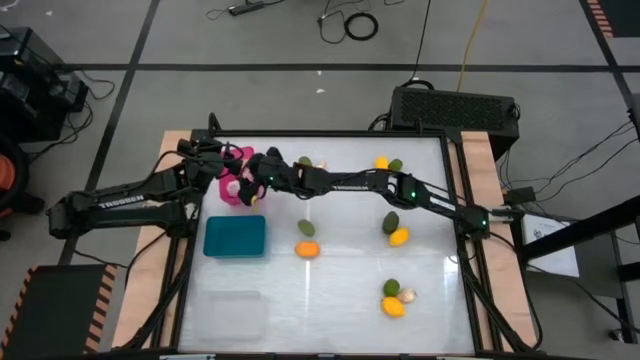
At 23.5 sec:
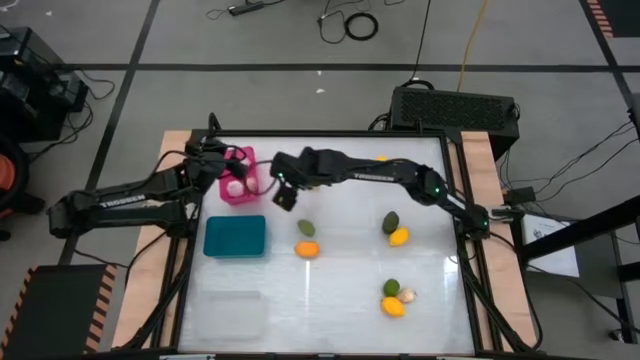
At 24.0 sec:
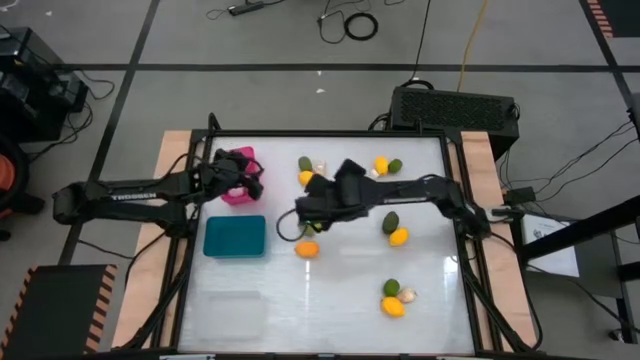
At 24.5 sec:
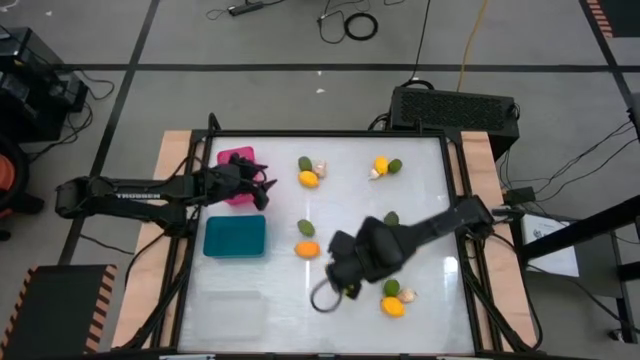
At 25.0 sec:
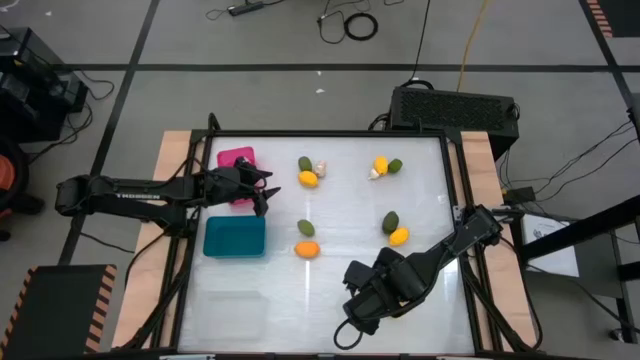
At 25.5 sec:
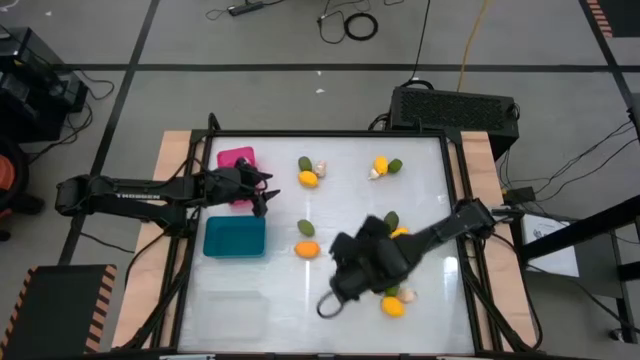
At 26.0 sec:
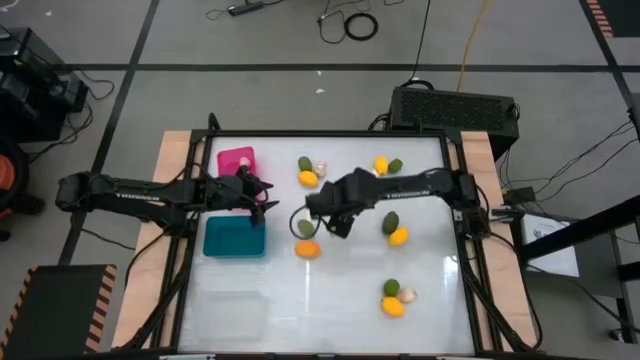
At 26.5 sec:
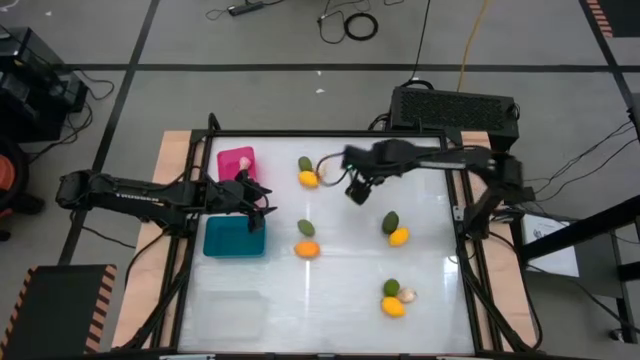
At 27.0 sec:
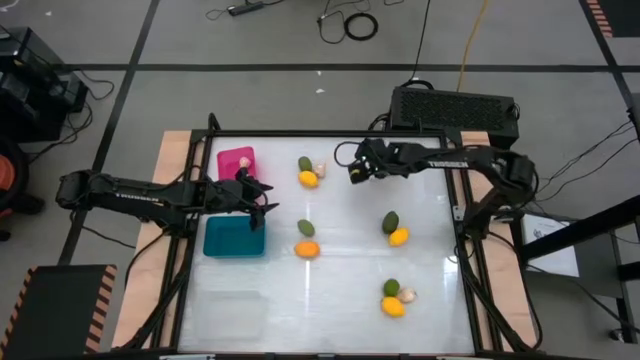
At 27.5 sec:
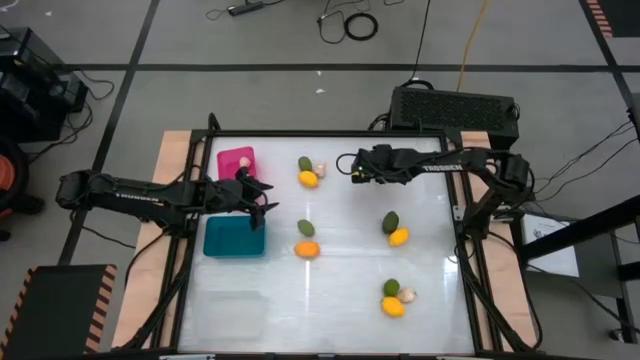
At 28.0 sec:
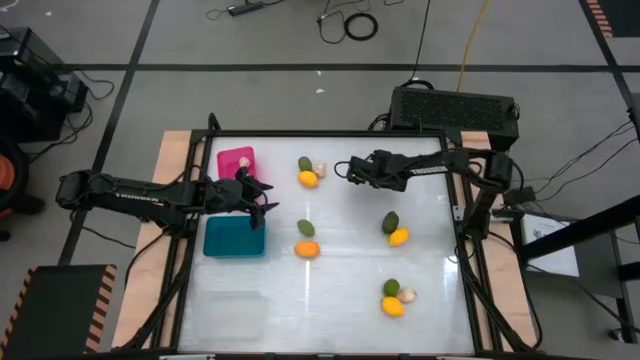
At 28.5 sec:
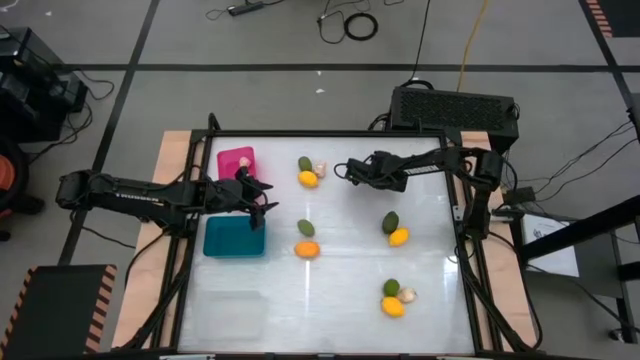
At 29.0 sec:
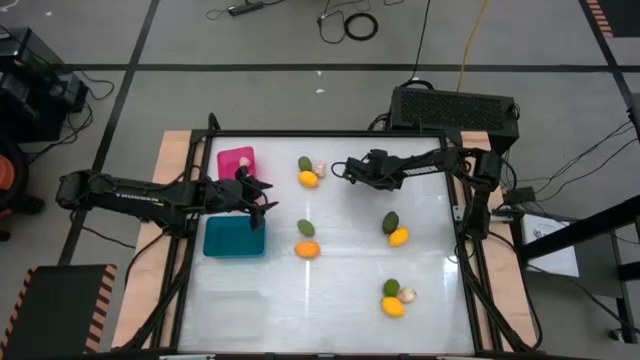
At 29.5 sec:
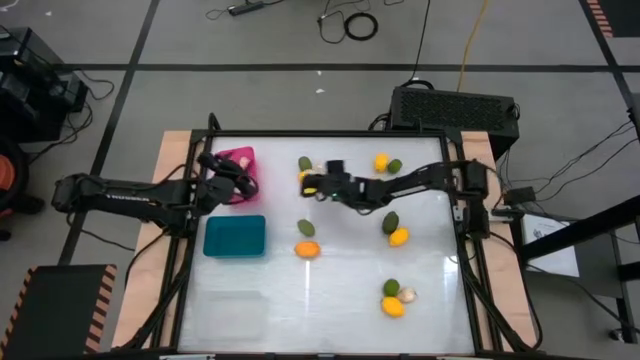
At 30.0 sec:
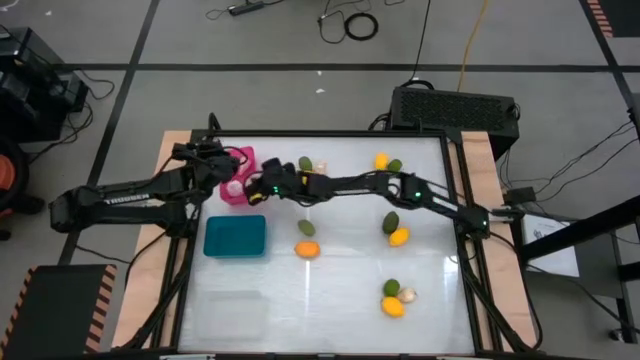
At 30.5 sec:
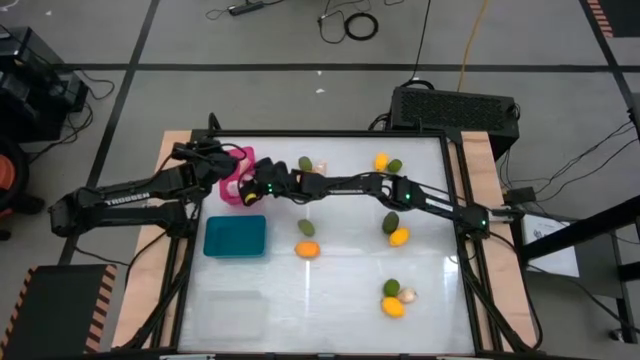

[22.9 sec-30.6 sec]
Task: Sort produce into baskets
Put the white garlic into the pink bin

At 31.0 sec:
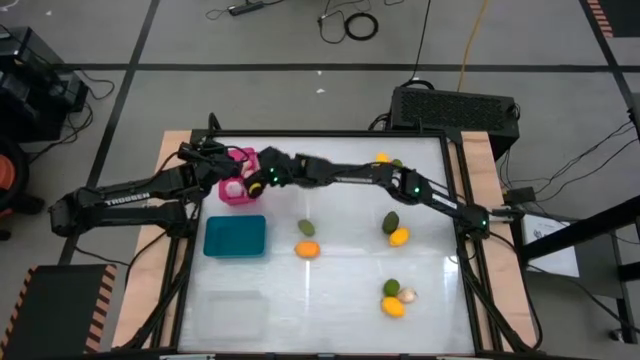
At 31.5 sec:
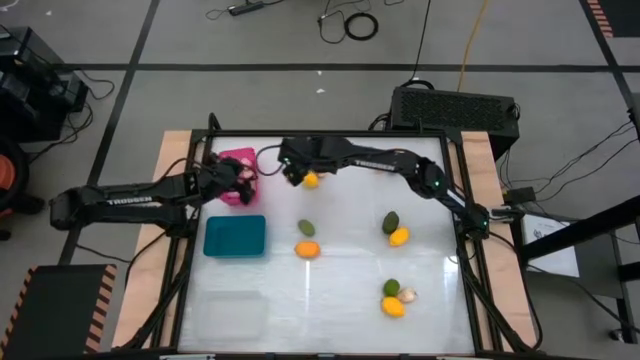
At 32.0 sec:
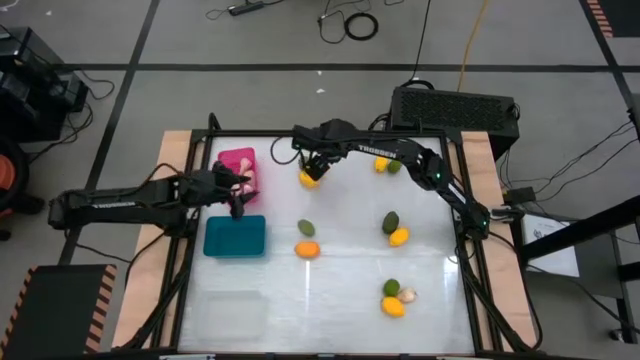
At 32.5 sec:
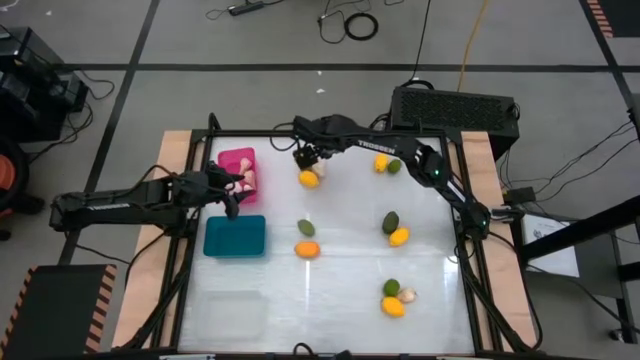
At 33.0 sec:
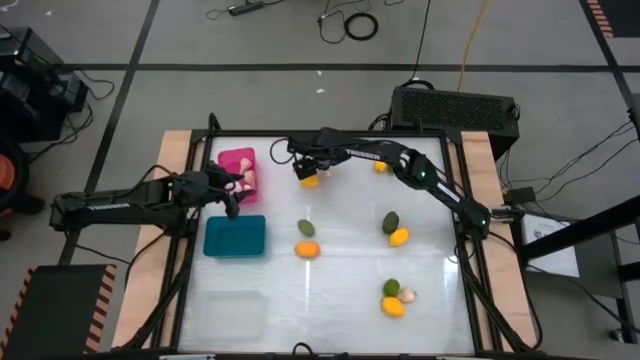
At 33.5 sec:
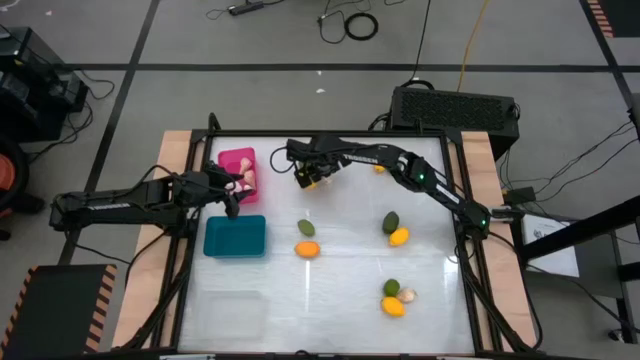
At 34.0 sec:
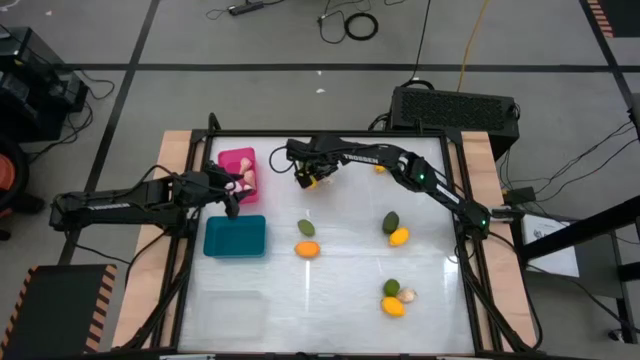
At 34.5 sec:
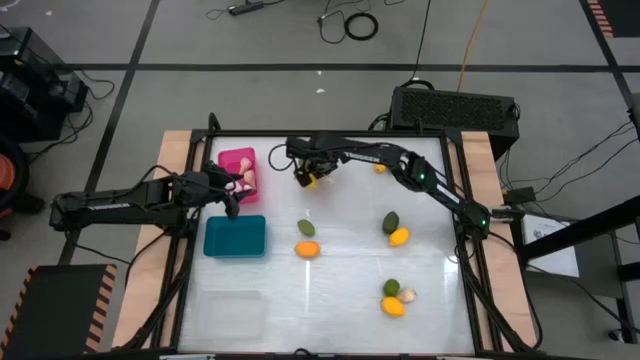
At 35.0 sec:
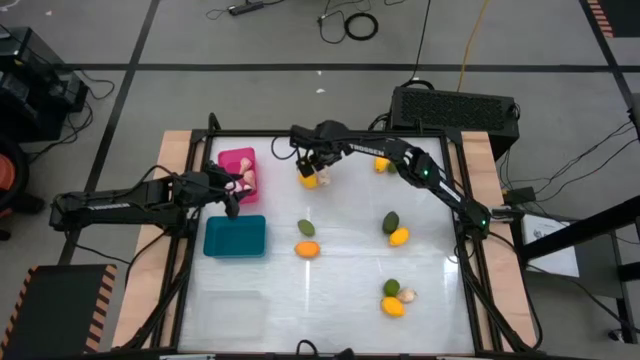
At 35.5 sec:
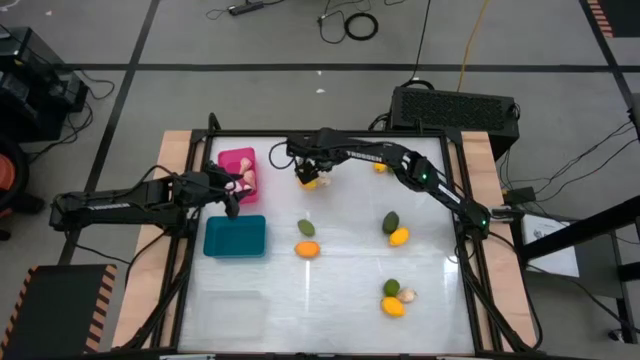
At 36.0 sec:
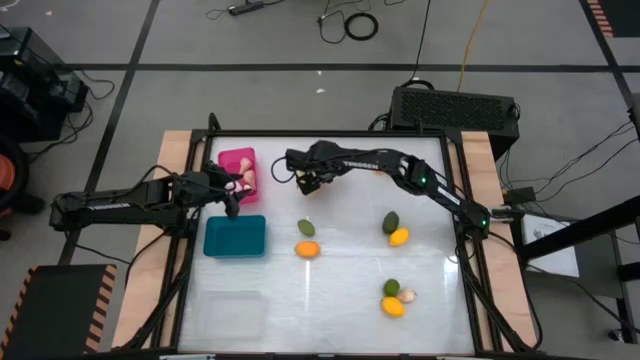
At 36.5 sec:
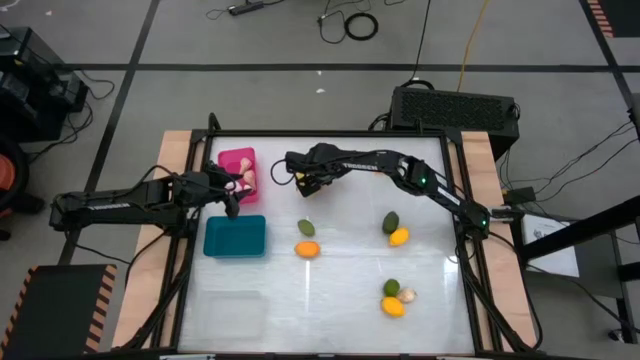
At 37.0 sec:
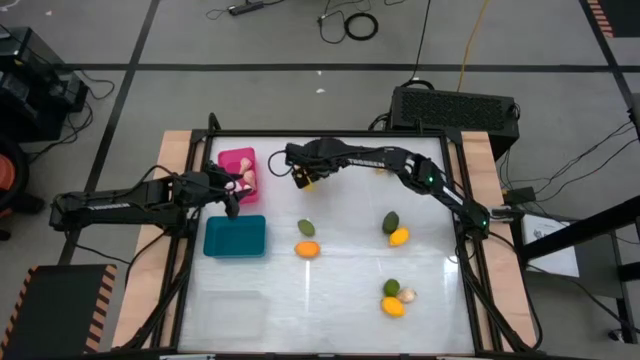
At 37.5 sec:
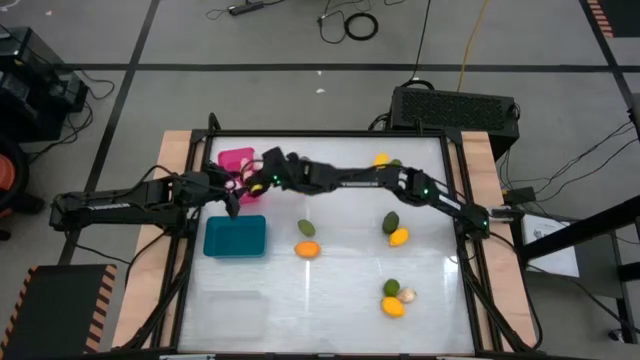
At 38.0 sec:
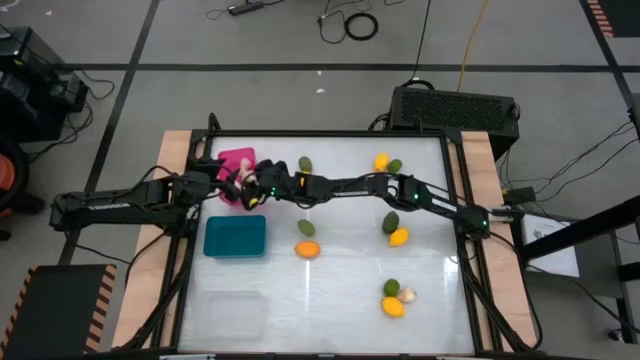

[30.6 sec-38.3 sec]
Put the white garlic into the pink bin

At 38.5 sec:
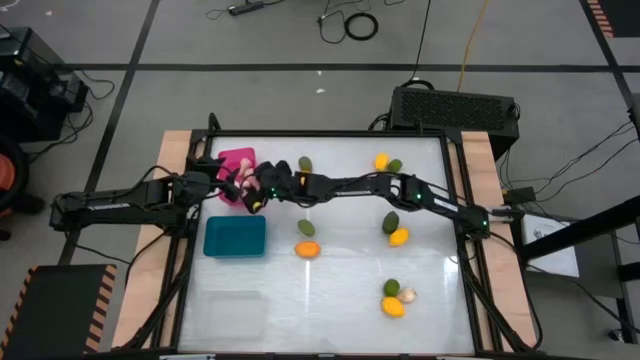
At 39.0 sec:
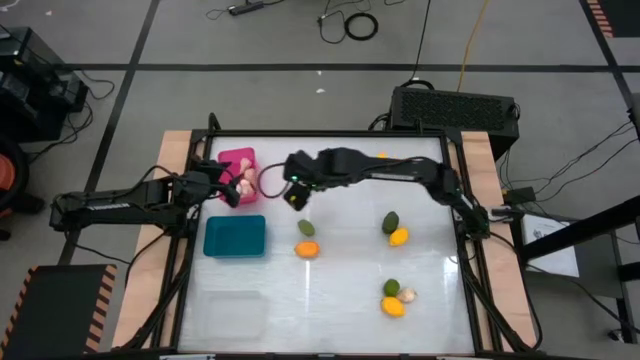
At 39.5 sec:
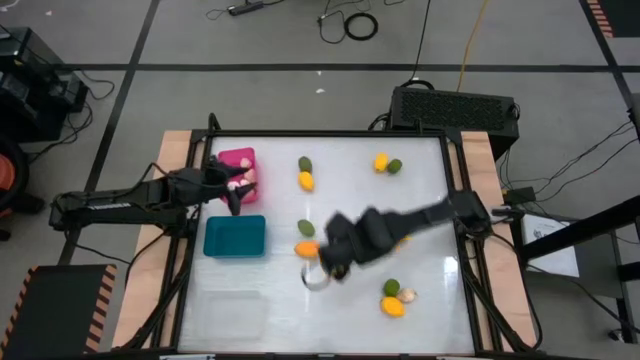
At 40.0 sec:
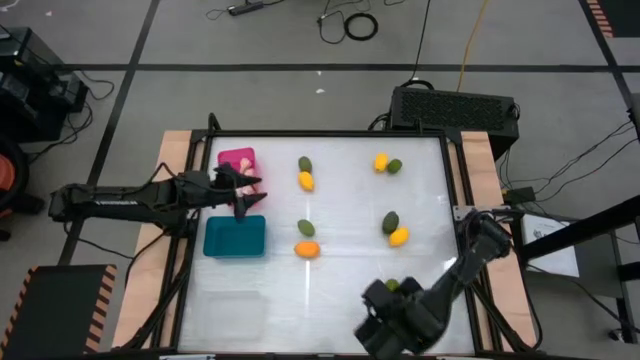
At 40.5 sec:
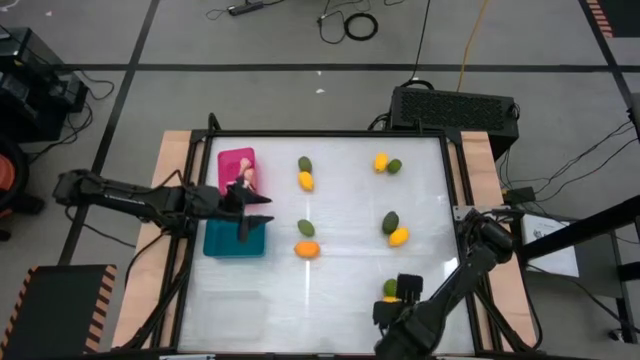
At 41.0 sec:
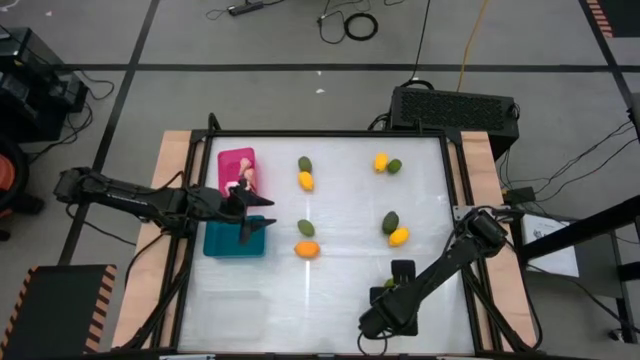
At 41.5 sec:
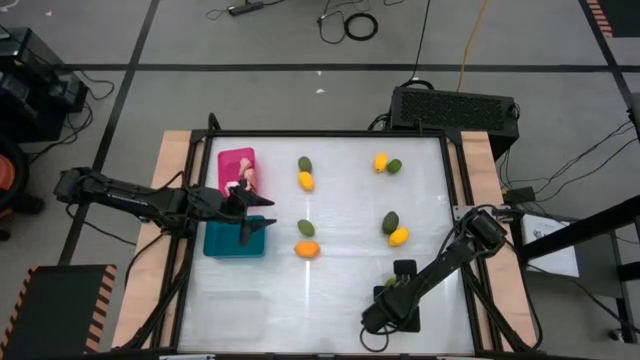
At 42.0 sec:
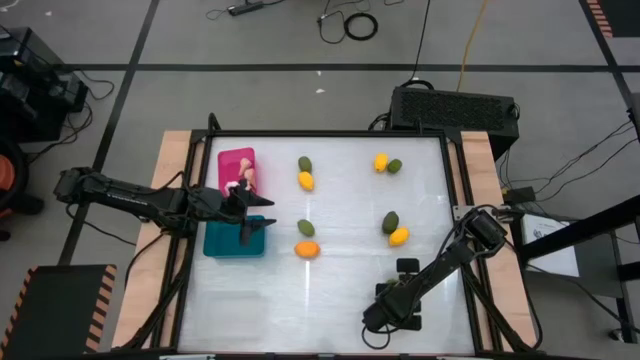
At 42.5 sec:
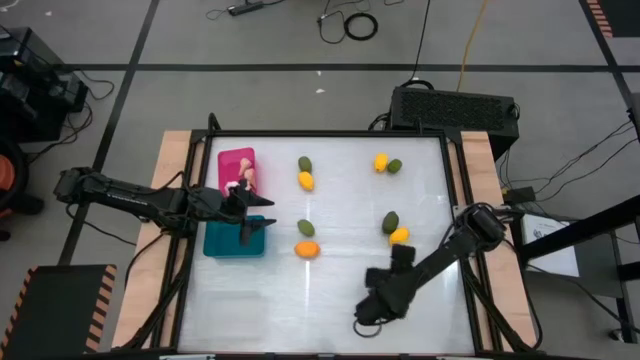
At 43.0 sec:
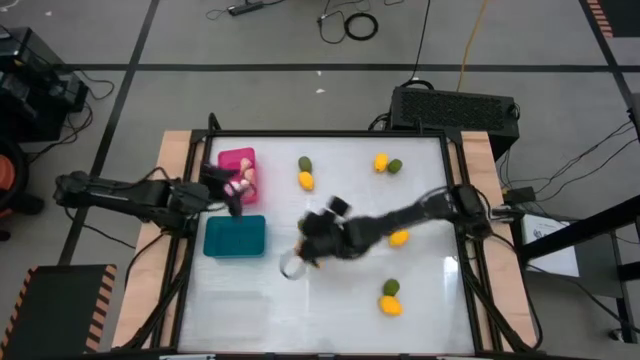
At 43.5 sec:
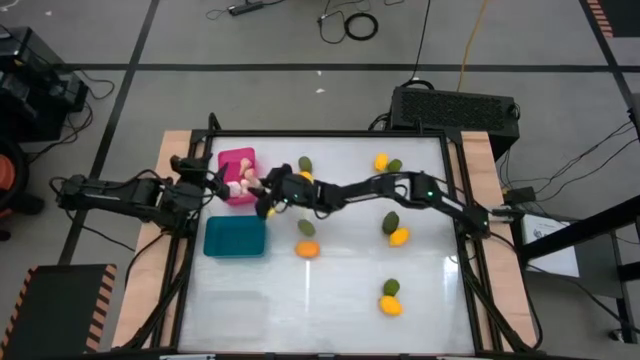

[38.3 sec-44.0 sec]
Put the white garlic into the pink bin
